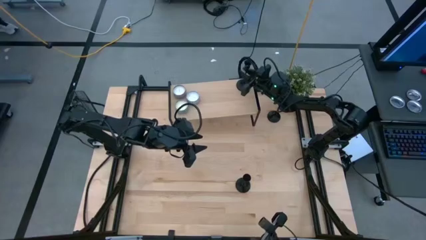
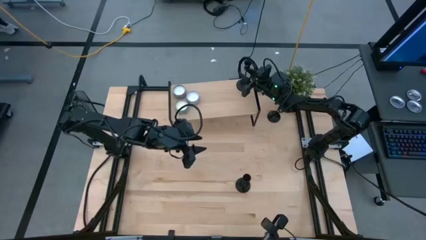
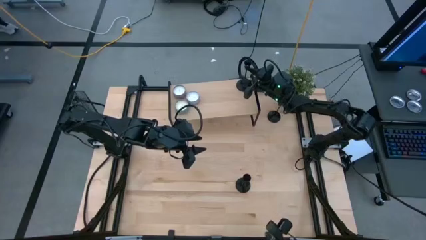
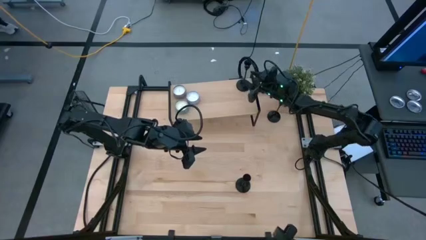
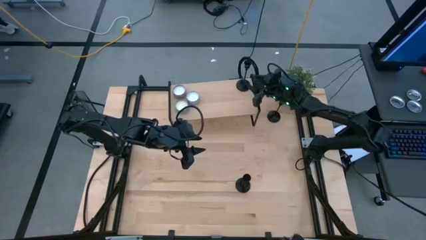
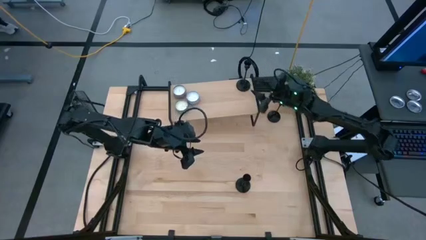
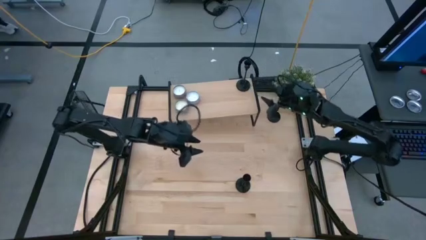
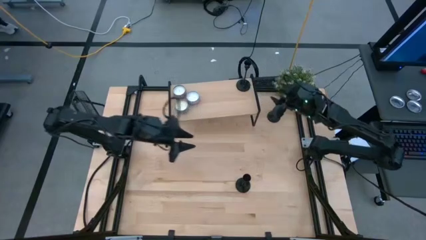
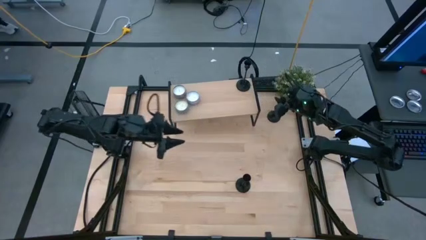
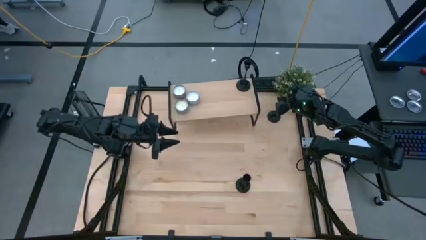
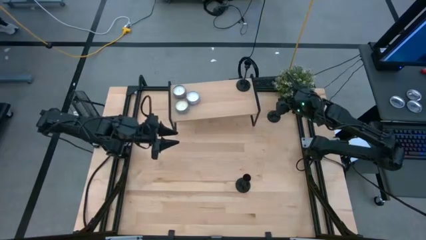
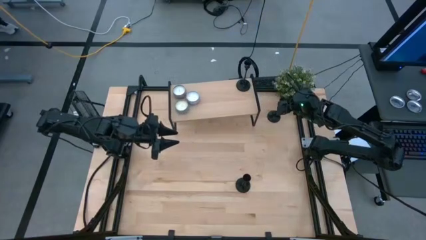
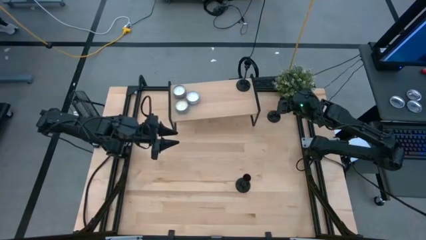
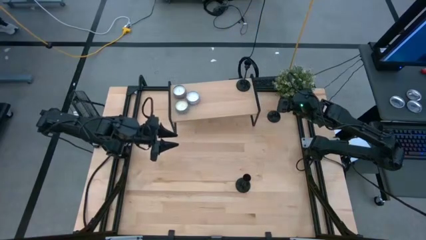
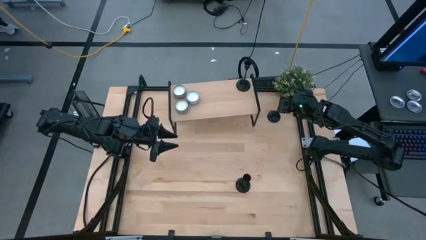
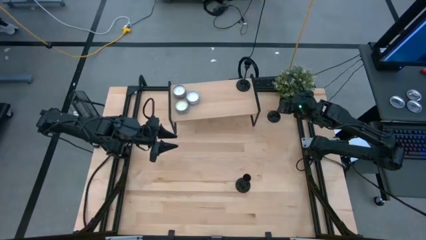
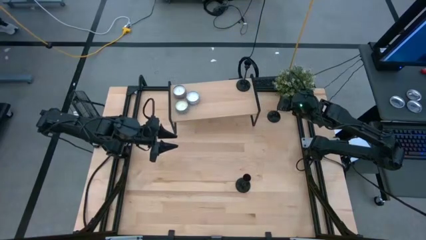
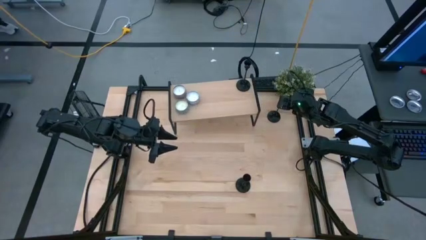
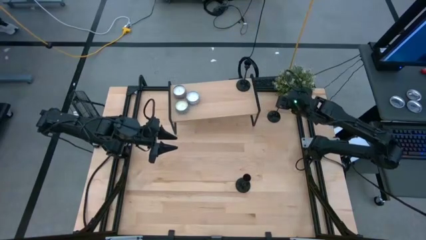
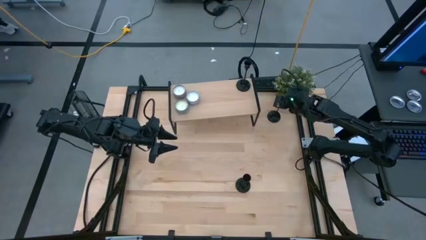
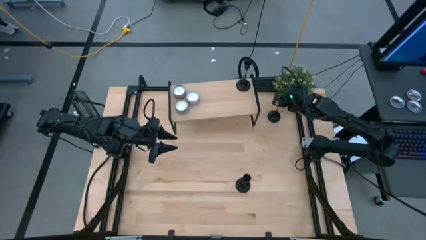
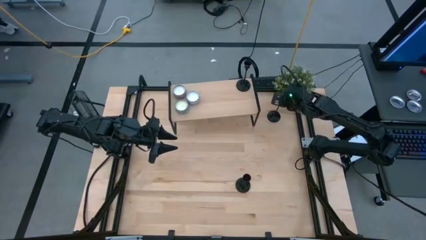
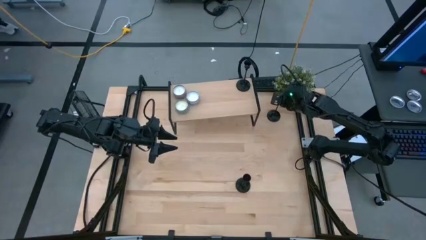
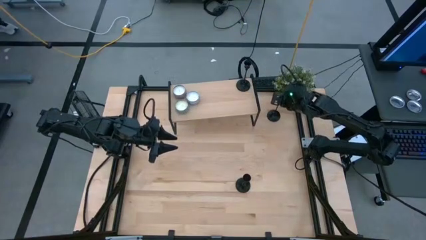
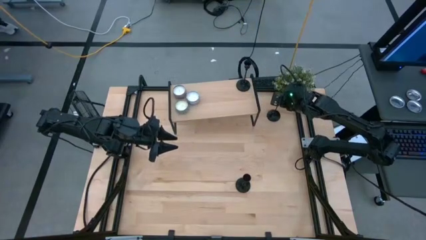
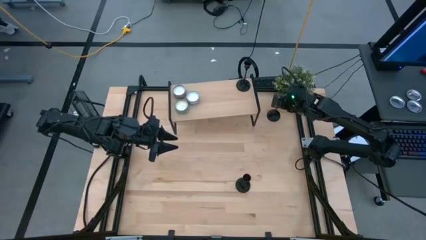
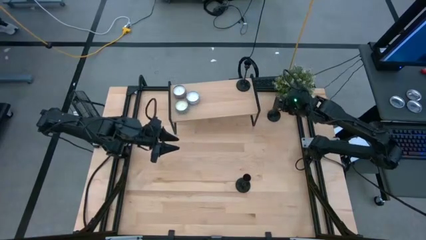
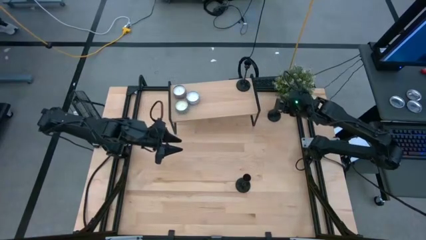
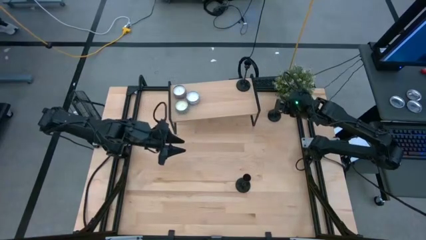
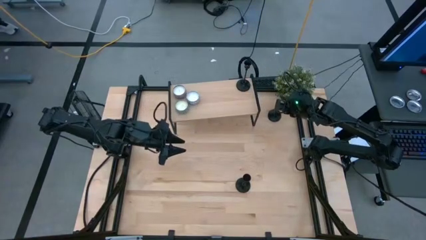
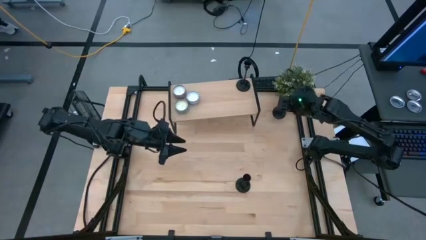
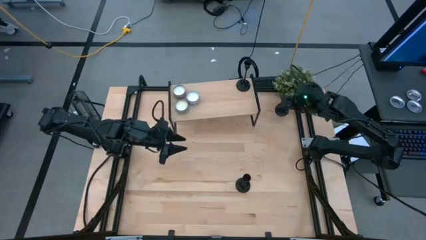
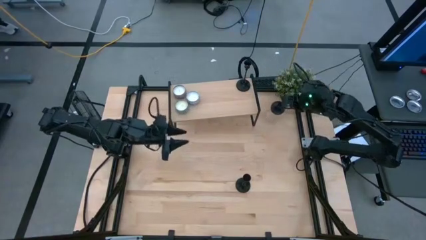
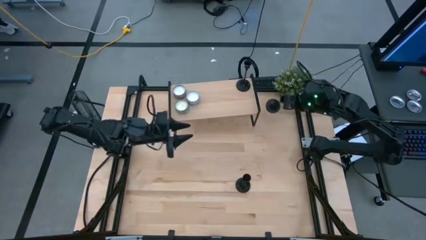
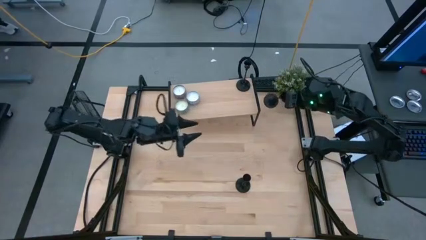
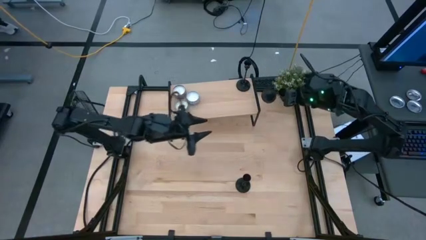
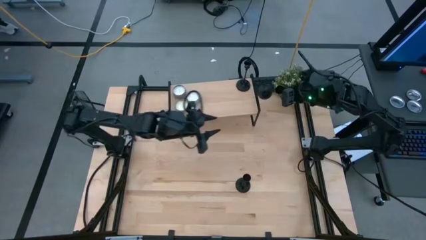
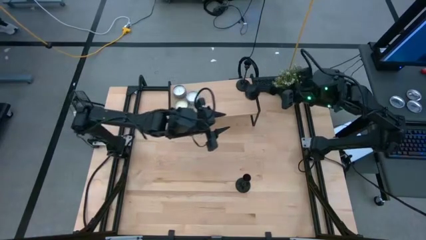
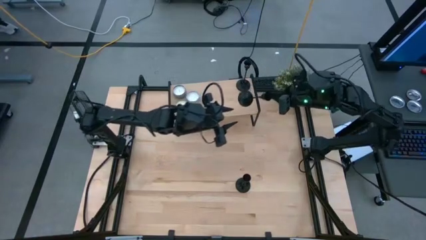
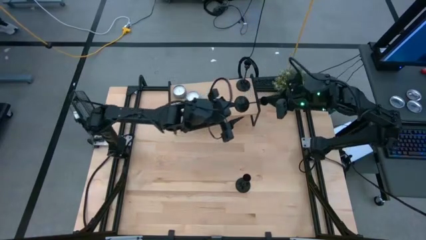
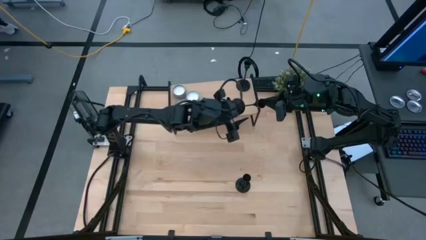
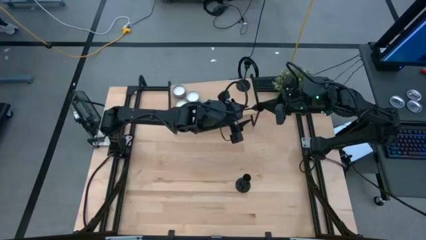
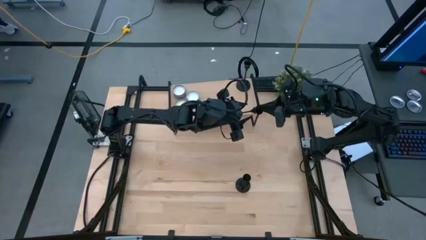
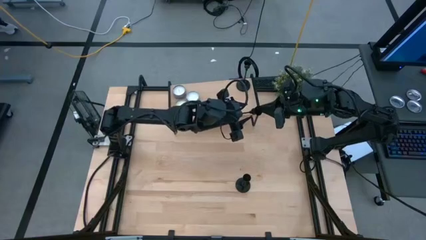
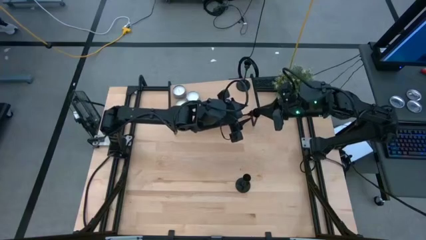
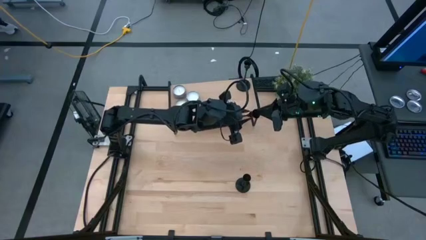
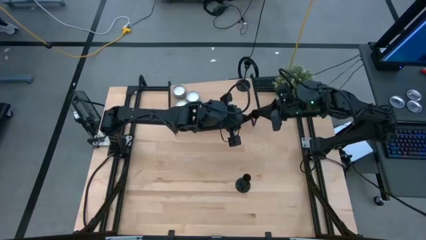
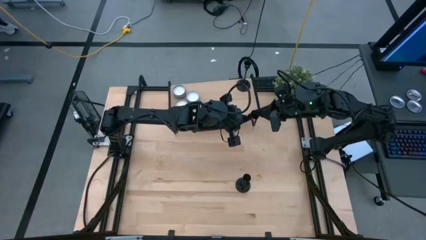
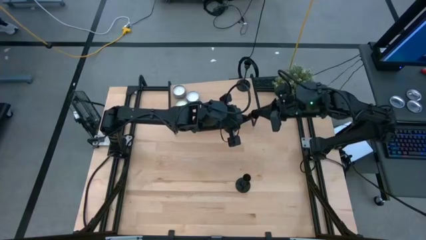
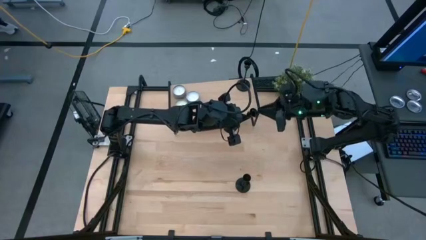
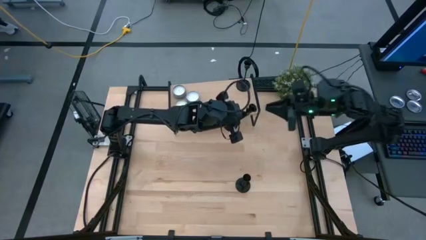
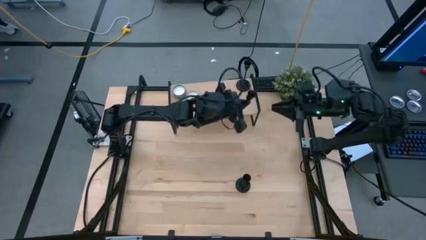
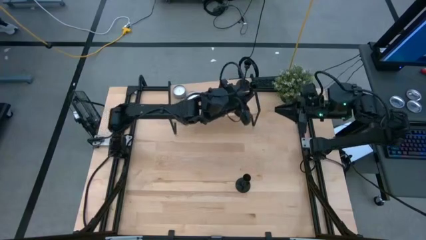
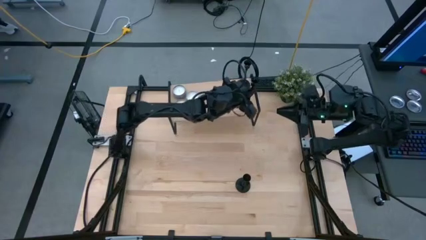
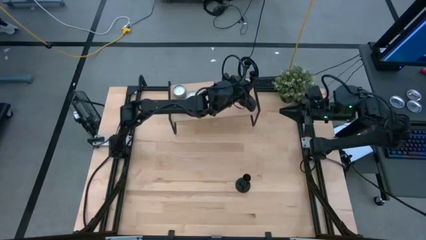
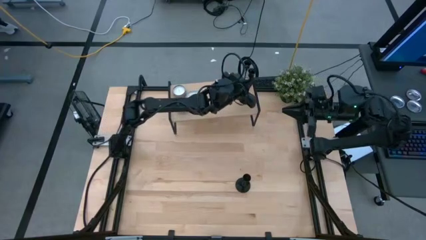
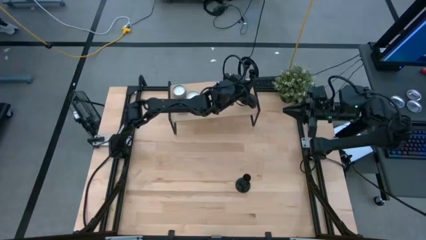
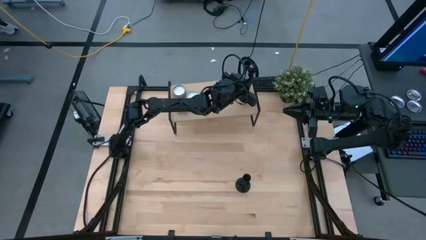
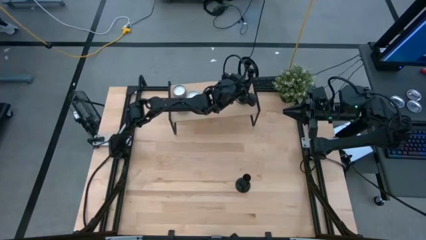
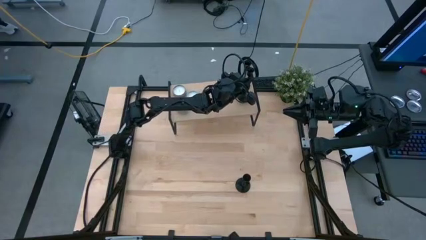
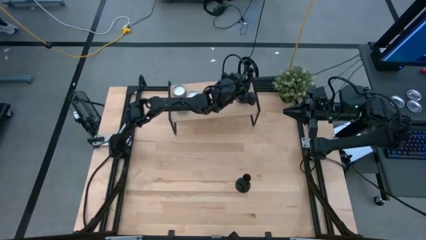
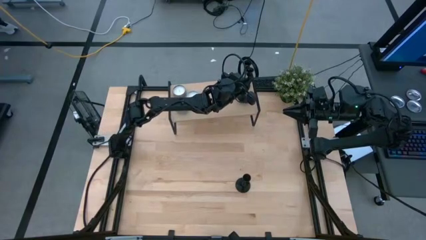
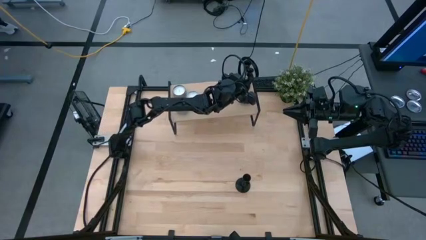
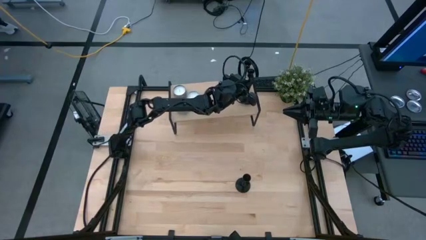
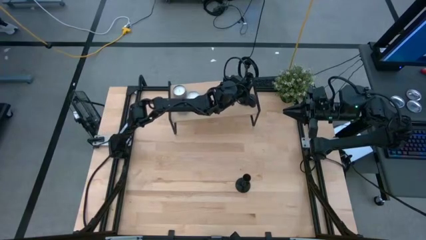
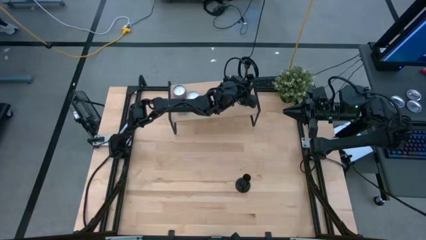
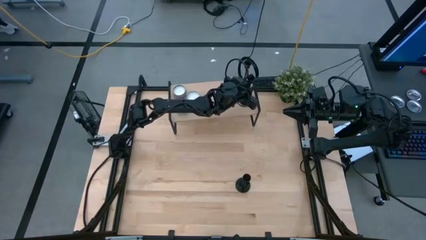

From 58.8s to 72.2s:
Task: Pick & Place candle stick holders
Put the top black candle holder on the shelf aligned with the black candle holder
